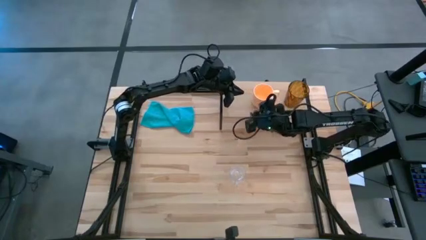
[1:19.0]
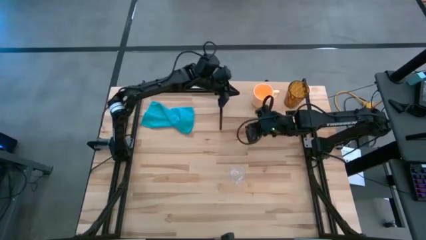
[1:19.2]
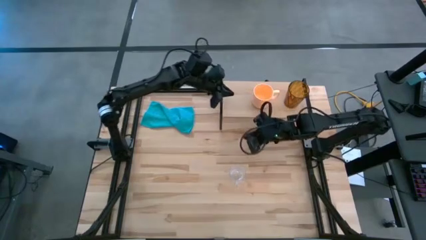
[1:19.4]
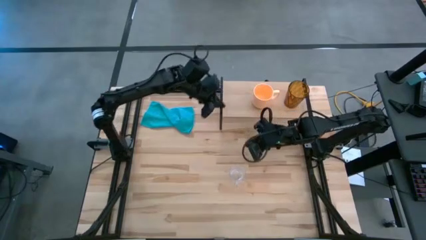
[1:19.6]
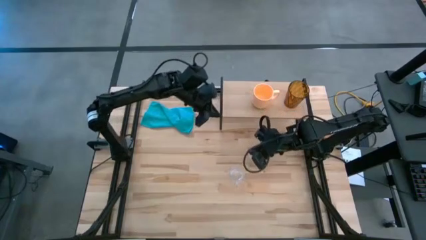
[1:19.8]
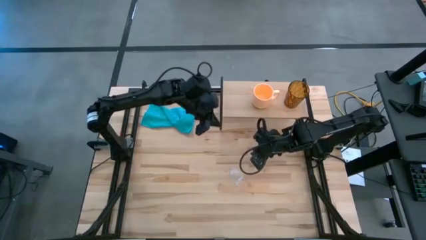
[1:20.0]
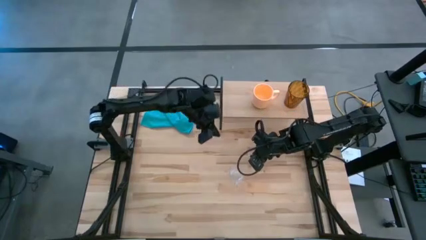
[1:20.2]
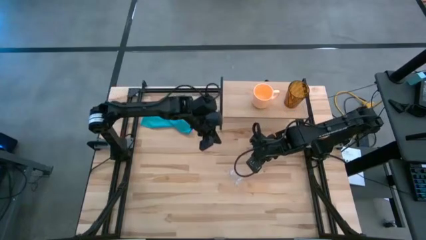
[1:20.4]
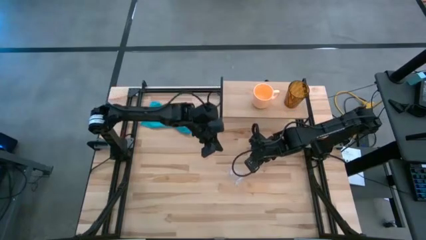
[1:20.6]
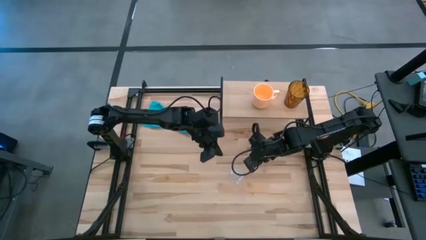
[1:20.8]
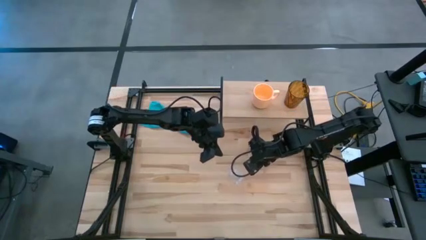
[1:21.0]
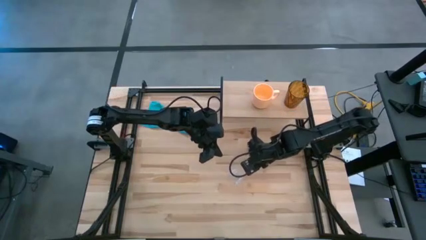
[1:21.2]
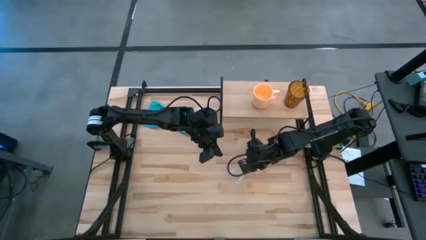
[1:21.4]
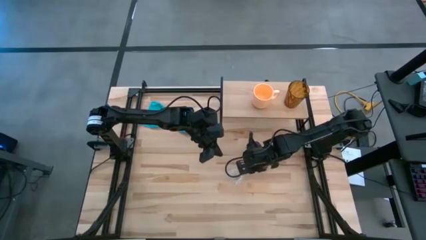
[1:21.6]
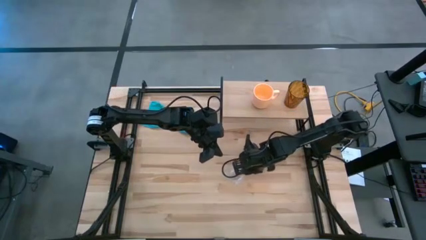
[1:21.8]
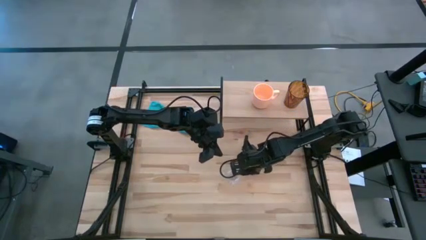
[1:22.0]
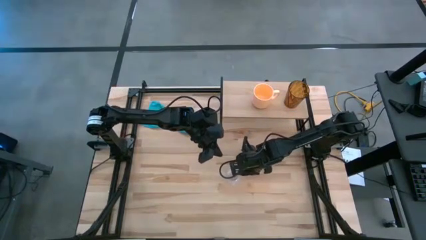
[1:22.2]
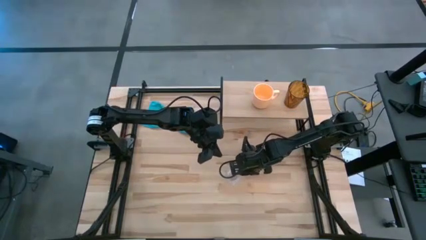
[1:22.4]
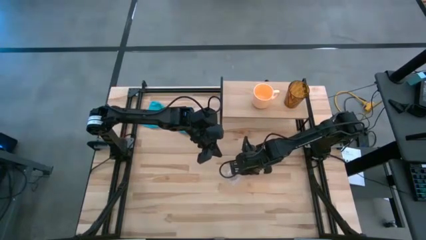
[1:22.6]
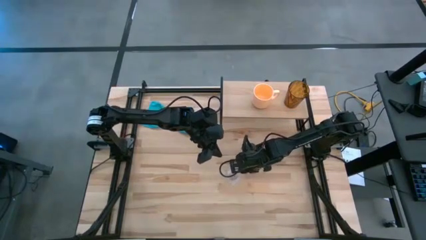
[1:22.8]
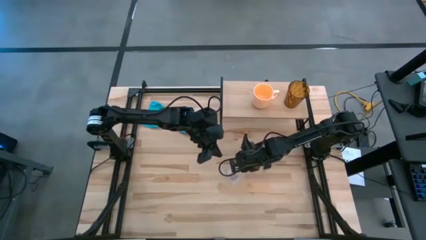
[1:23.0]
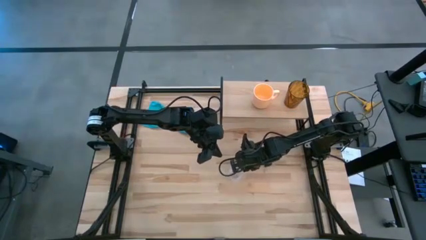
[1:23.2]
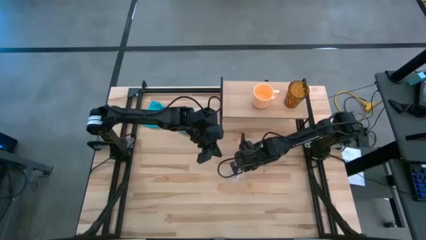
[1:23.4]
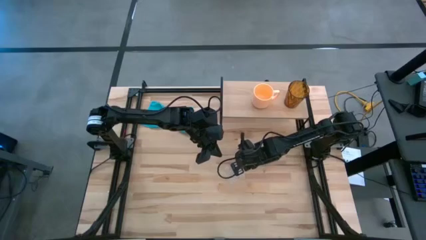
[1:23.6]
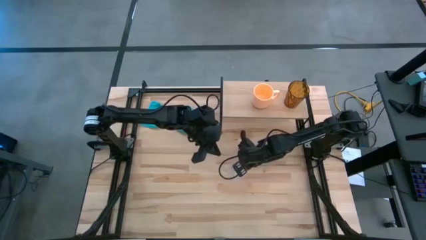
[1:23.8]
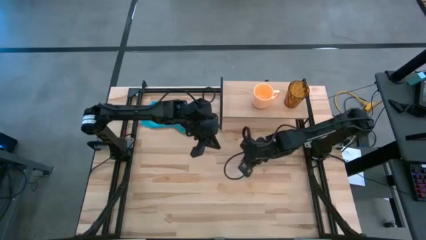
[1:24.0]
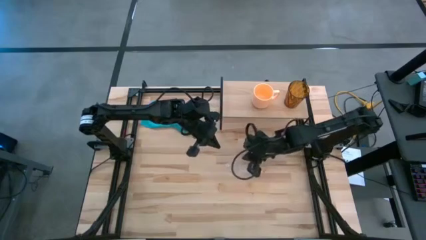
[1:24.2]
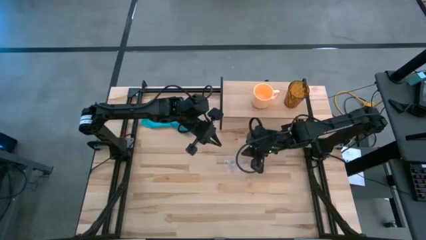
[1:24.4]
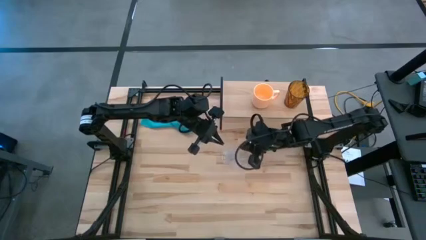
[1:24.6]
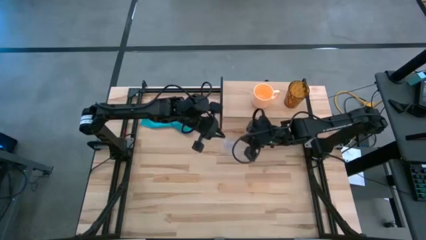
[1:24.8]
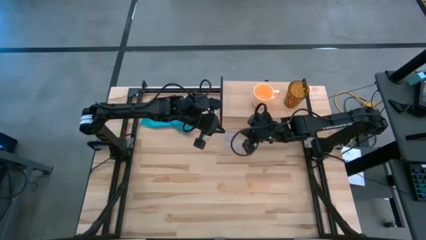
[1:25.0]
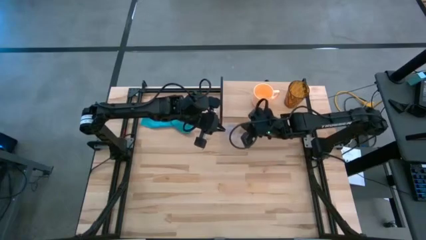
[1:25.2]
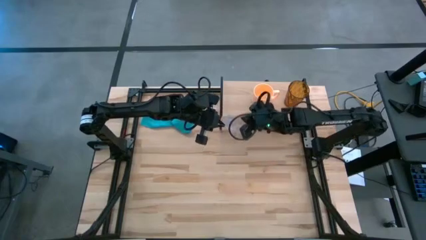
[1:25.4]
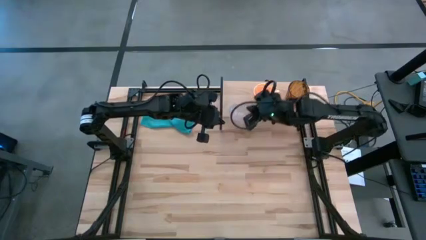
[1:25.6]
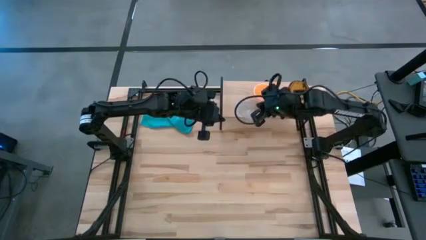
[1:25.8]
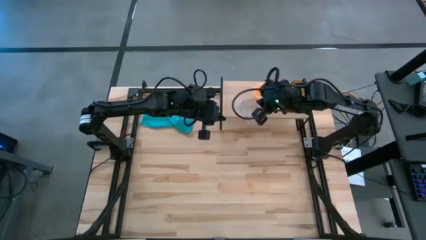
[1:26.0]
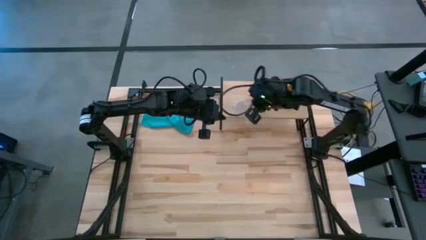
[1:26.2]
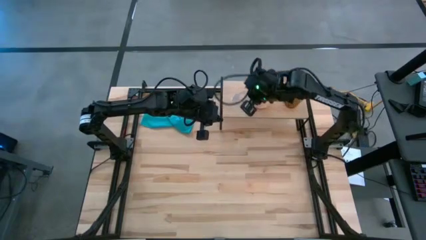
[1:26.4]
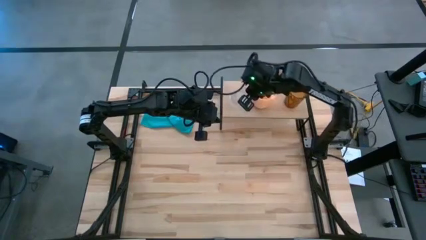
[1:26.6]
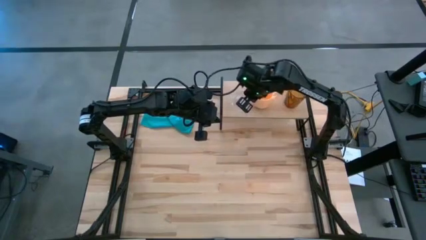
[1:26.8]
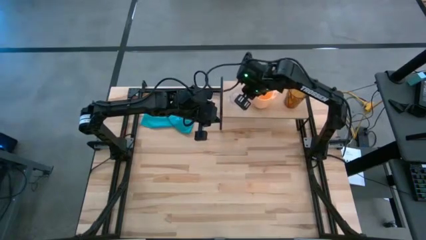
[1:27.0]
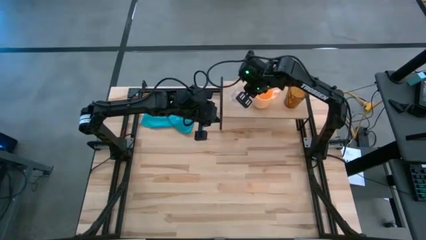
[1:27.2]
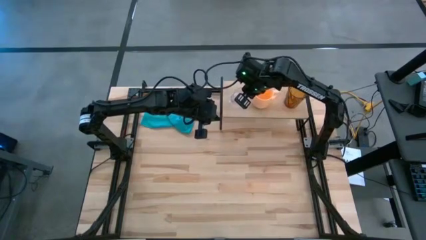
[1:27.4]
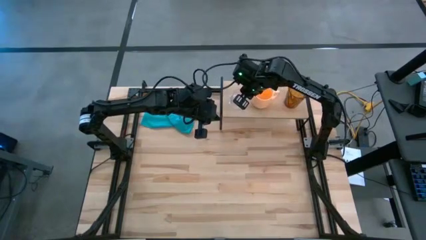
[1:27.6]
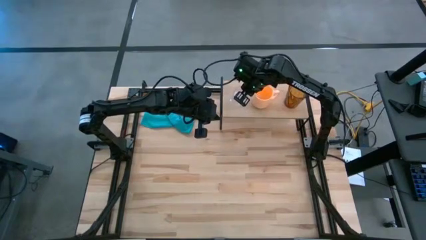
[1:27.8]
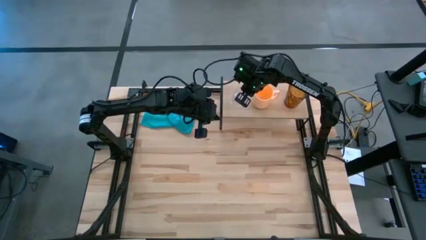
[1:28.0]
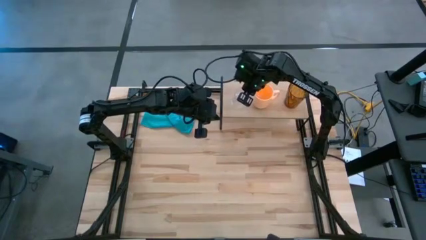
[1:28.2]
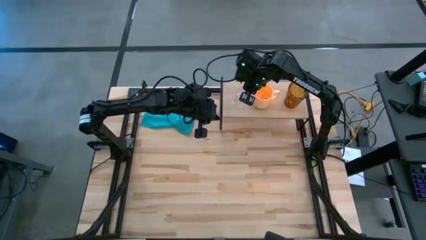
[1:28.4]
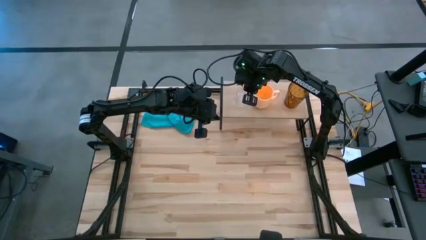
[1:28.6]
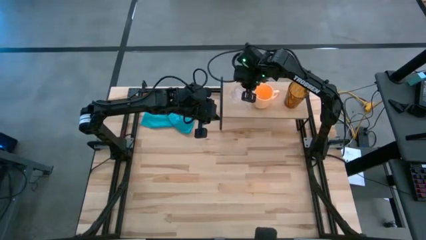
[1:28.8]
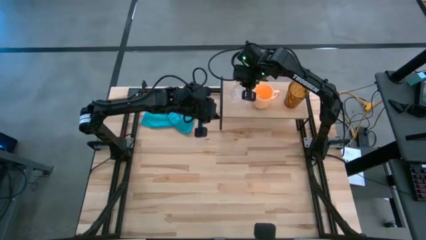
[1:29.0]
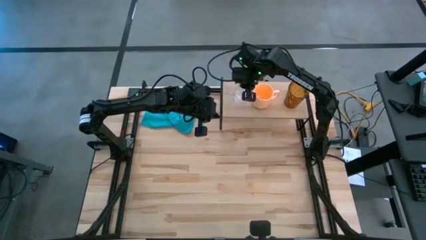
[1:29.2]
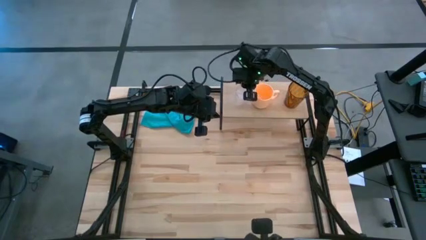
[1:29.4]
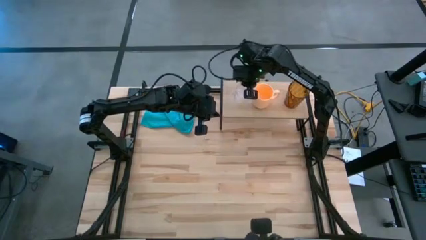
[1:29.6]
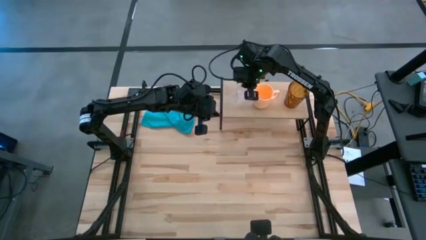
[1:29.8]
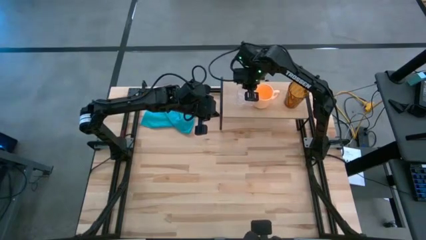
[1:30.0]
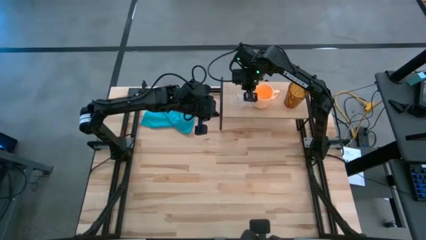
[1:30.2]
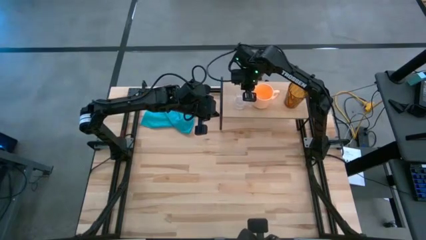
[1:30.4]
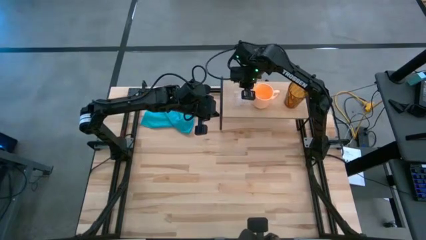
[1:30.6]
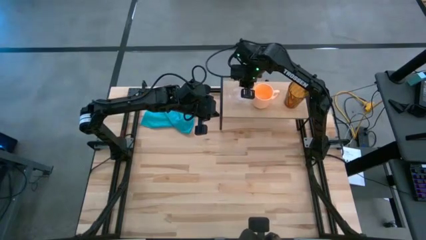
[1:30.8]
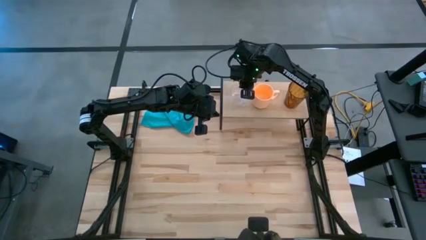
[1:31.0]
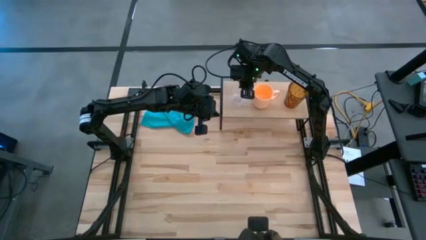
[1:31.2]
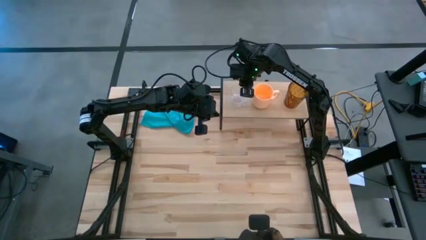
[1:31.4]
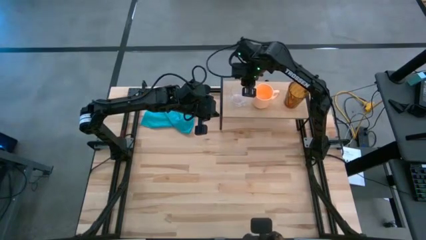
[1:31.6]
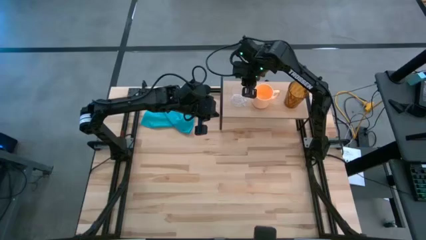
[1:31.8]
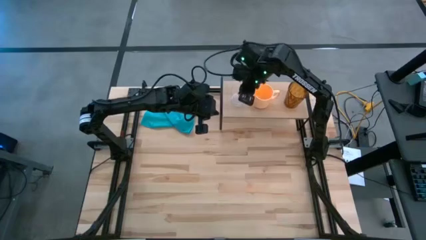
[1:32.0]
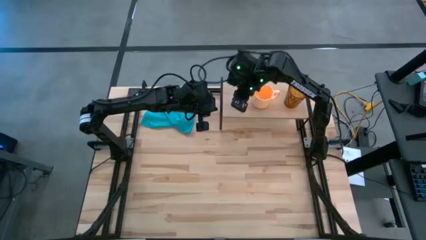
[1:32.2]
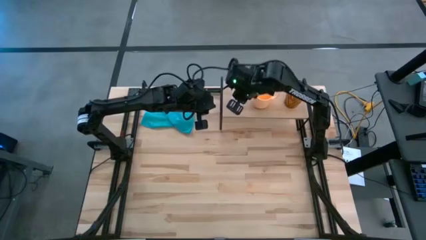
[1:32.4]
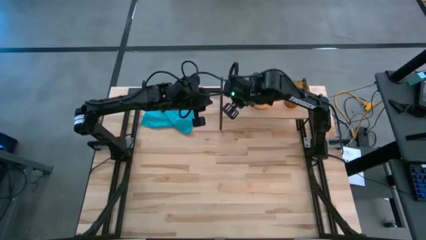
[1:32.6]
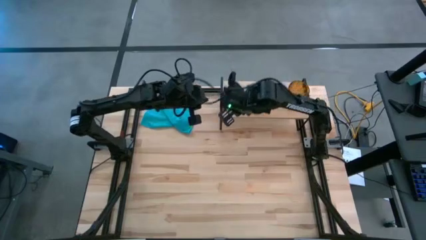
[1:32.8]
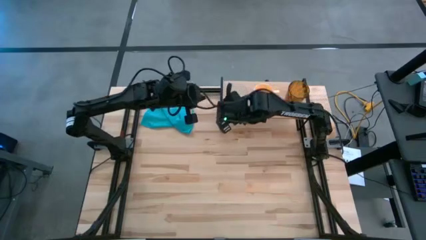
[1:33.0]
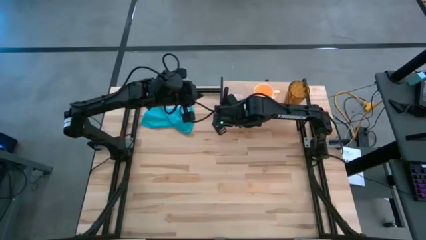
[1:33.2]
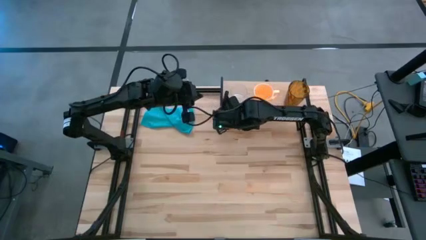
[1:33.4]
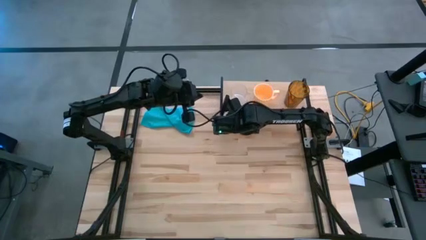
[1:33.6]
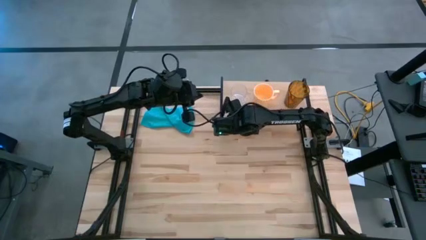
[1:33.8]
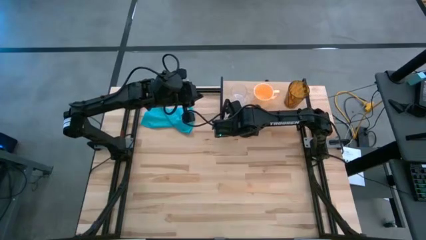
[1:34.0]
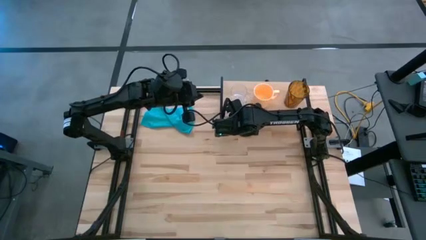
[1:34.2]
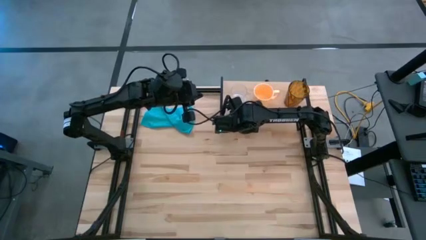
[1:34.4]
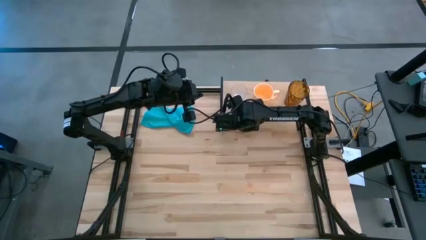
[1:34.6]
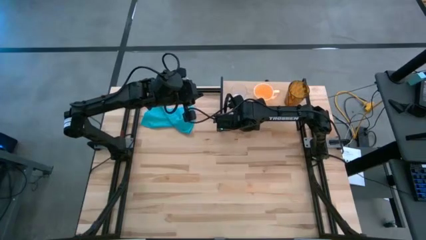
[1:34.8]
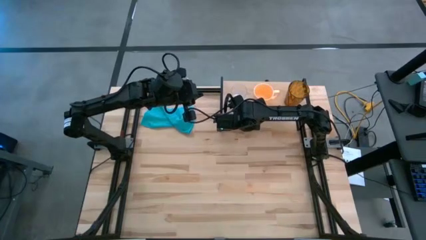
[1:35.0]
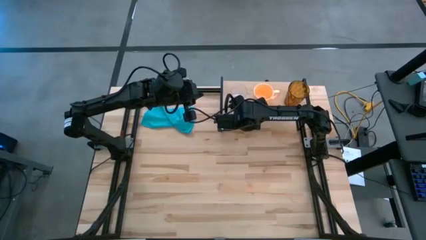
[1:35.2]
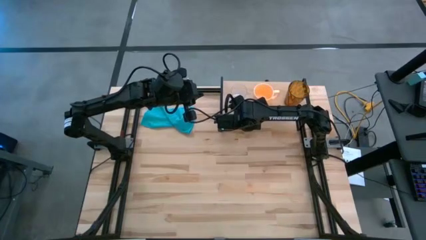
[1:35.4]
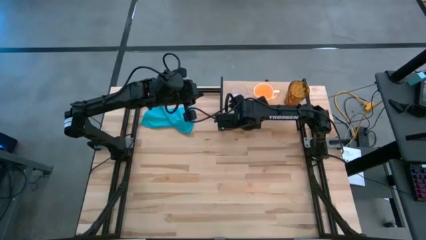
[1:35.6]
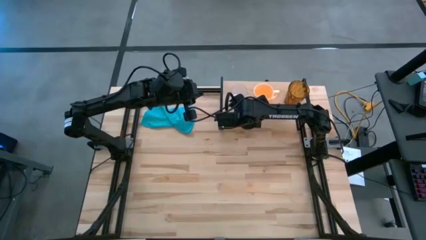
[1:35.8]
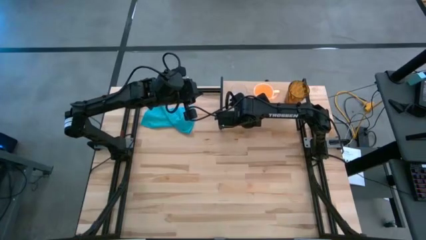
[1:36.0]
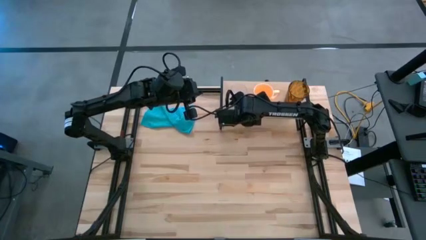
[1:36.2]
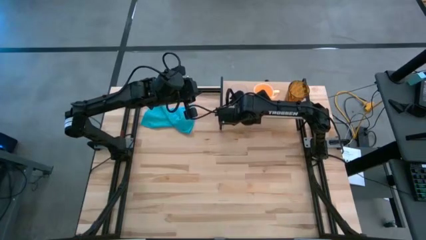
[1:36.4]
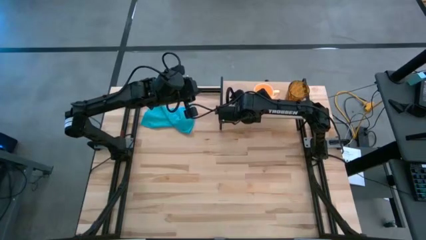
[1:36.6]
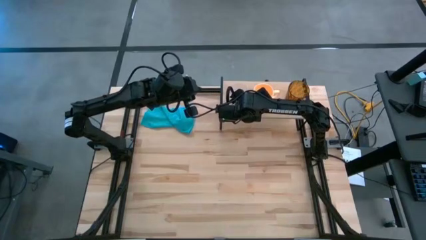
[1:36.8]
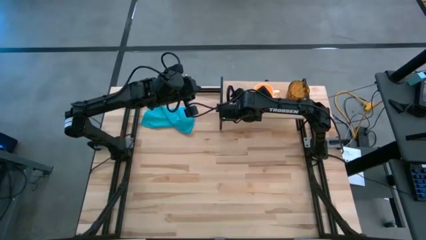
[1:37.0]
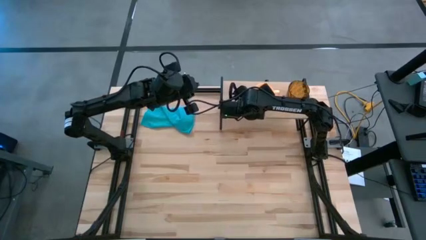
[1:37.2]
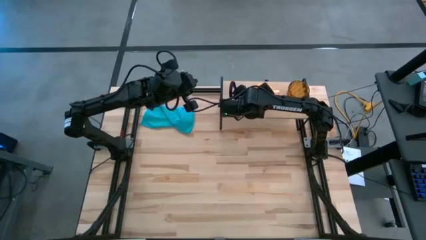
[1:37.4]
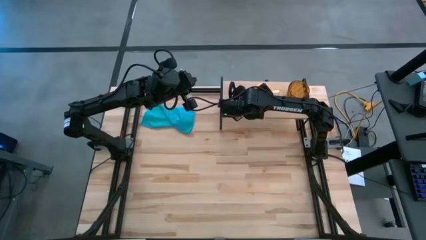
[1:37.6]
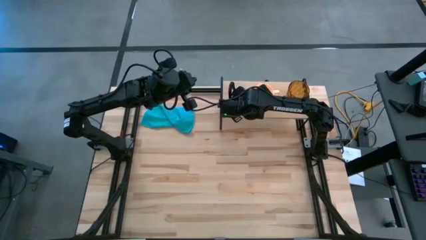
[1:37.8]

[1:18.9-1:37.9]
Task: Stack small to large cups/mugs on shelf
Put the transparent mug on the shelf
